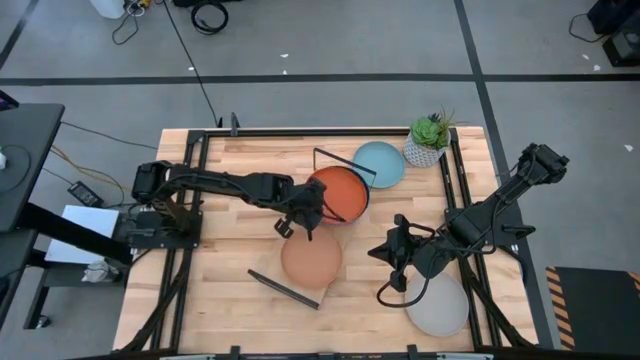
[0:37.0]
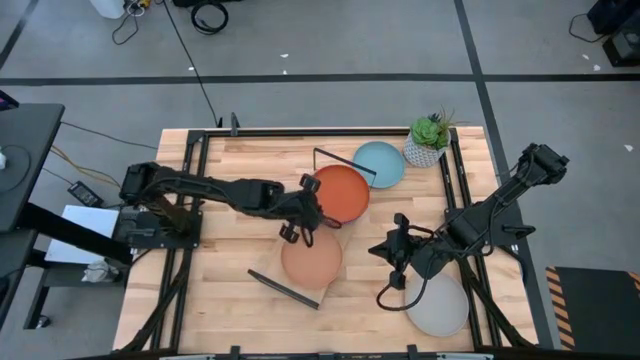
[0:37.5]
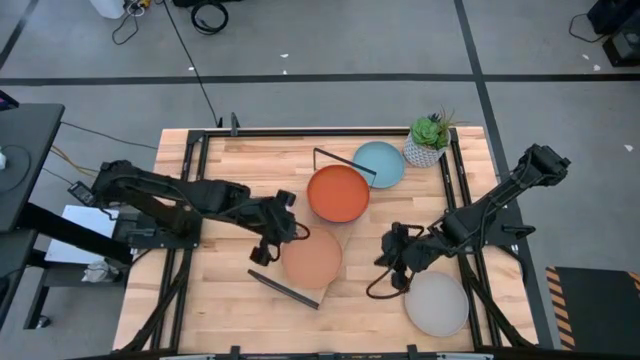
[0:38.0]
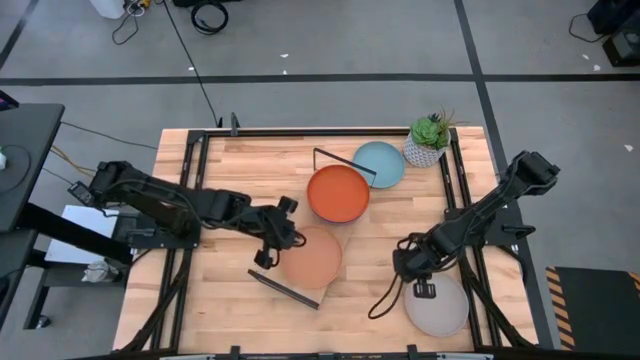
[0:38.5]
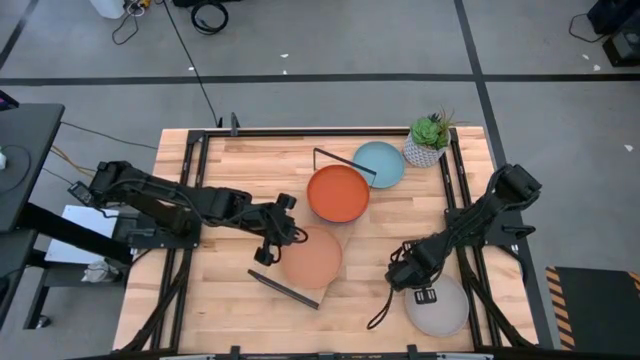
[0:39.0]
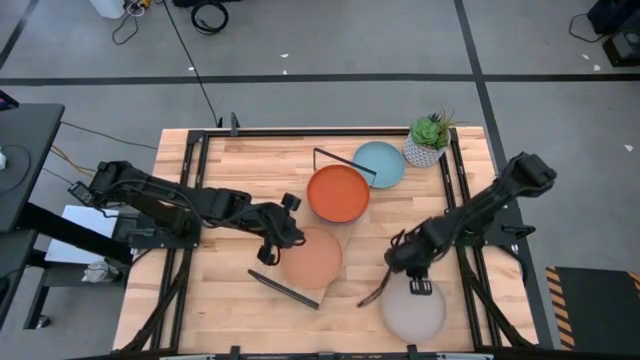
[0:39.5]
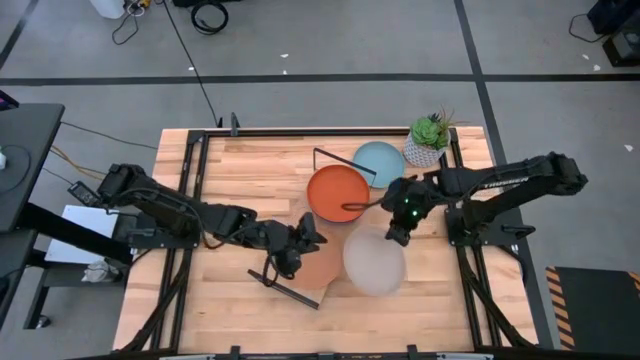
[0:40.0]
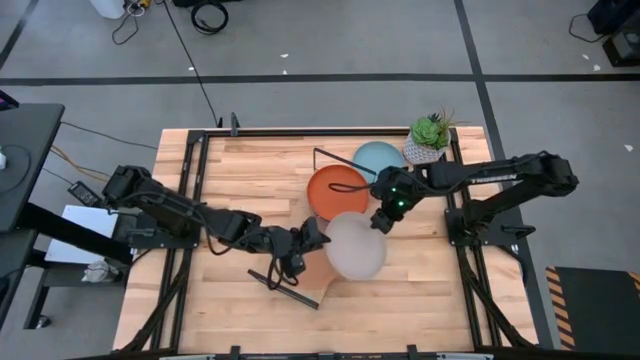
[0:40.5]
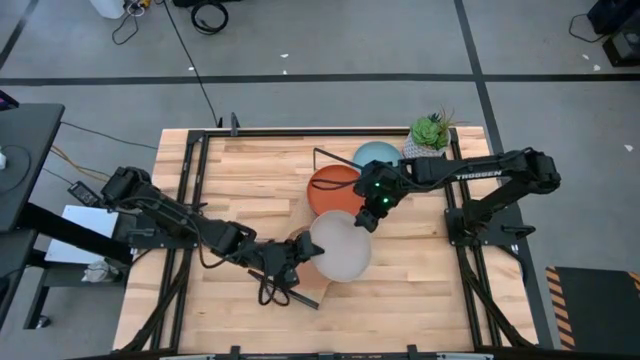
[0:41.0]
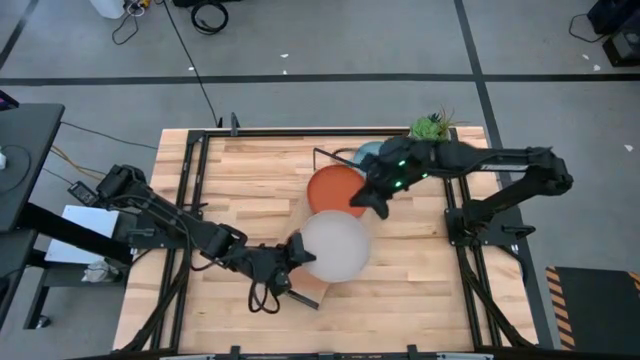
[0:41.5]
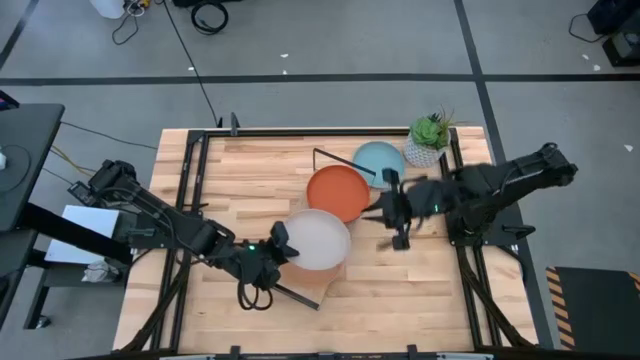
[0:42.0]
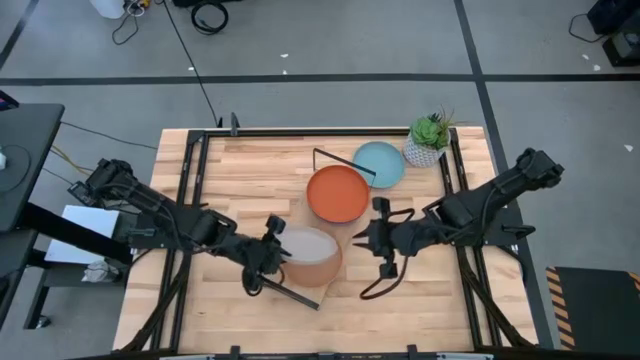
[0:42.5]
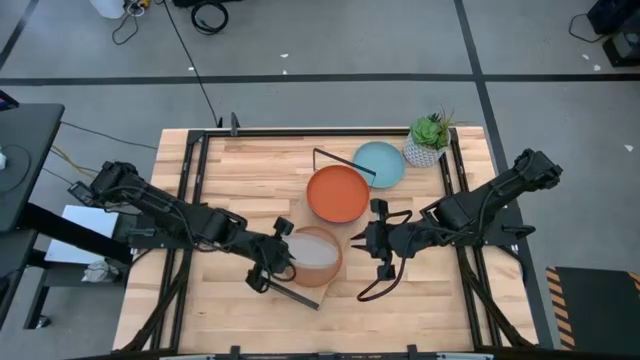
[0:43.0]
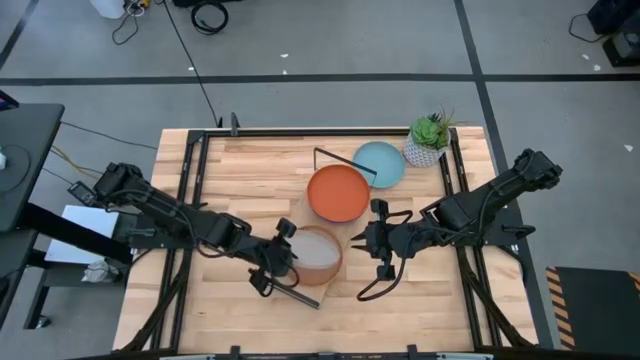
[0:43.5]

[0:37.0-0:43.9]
Task: Place and stack plates onto a shelf
Stack the white plate on top of the brown plate on the shelf

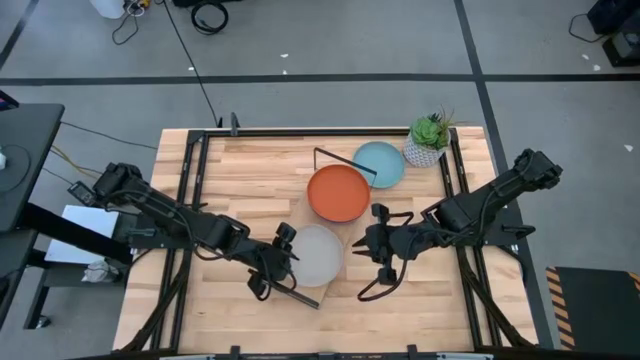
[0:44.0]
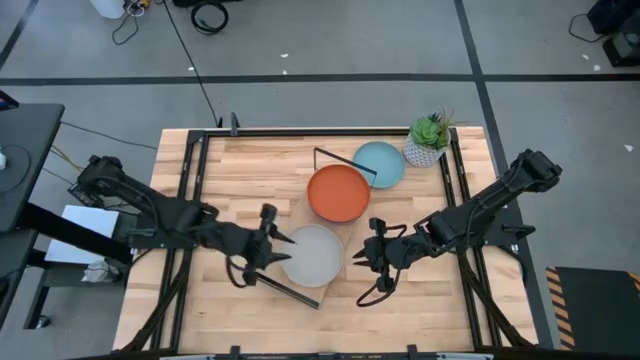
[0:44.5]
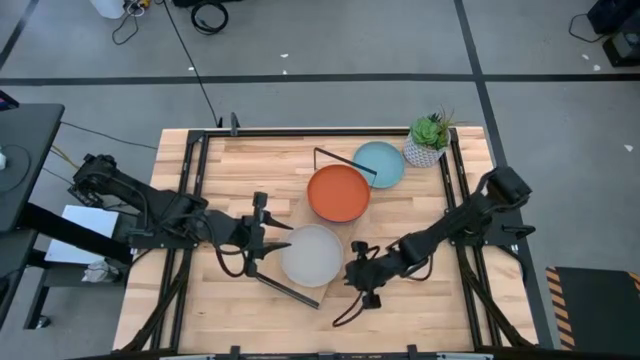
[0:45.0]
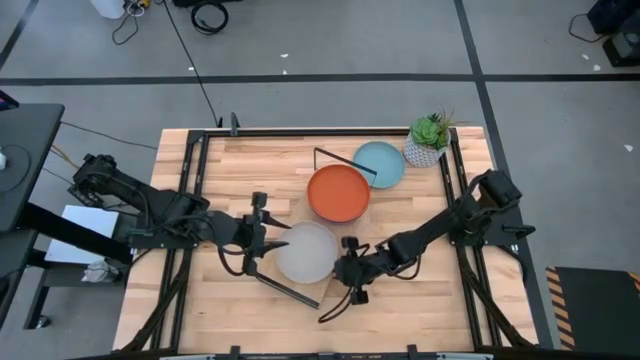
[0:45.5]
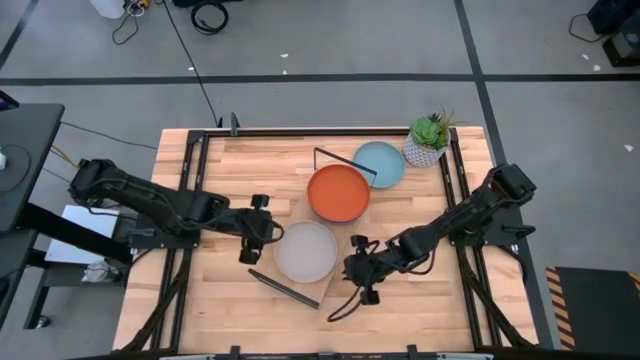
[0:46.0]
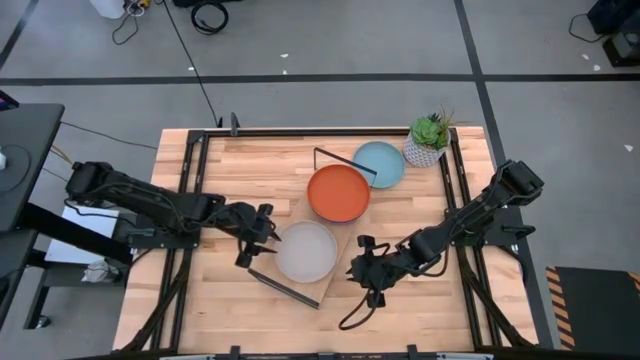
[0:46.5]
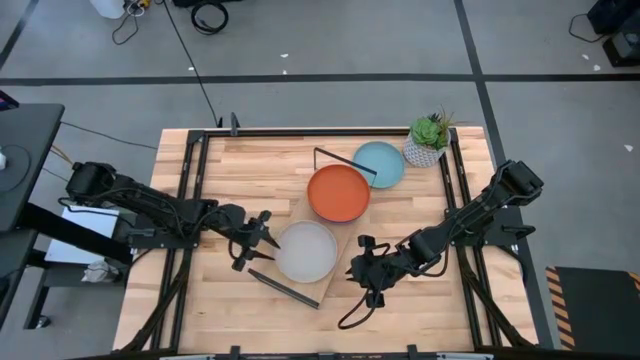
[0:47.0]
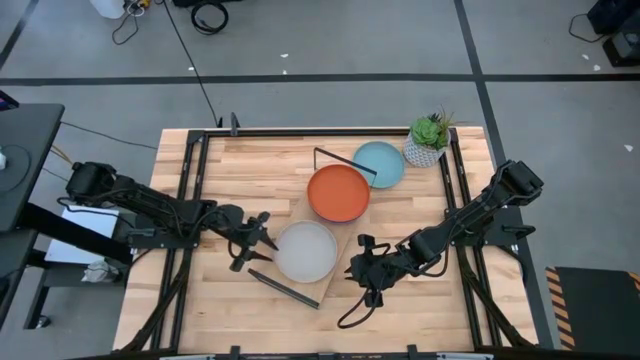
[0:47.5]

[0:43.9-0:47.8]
Adjust the left stack of plates on the shelf

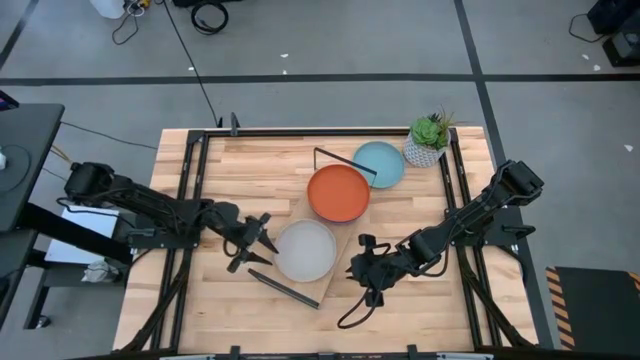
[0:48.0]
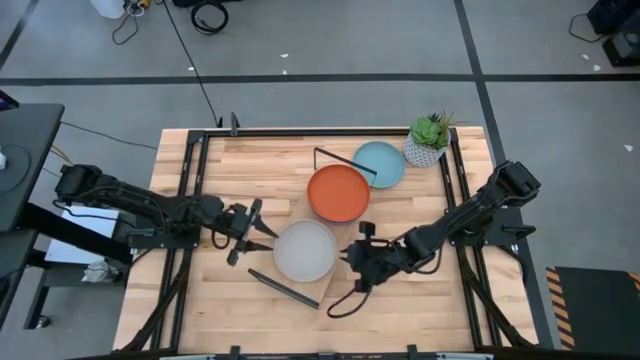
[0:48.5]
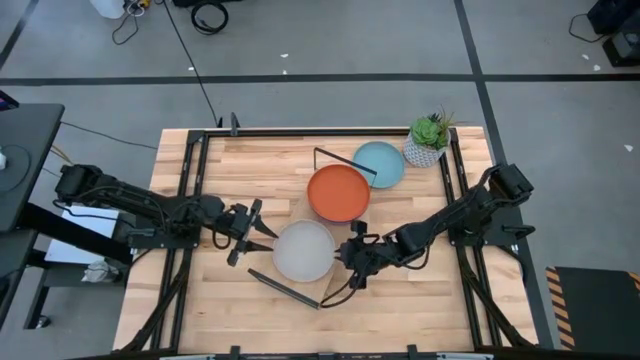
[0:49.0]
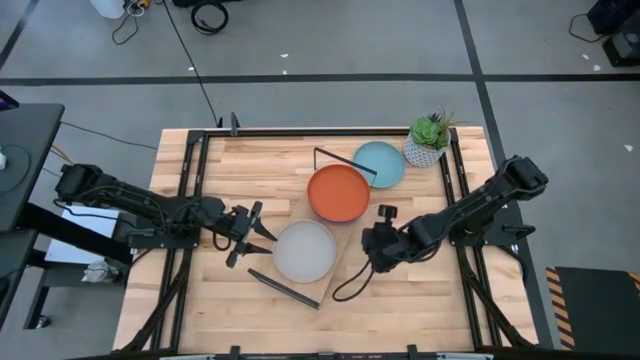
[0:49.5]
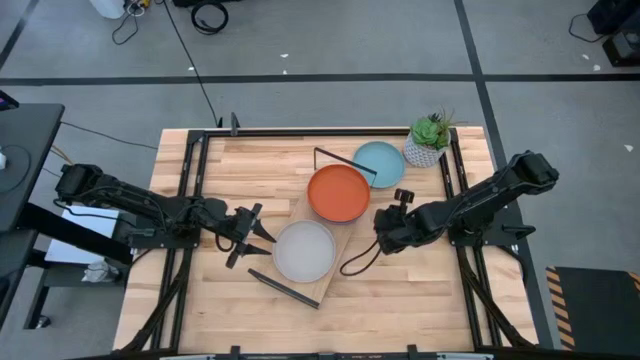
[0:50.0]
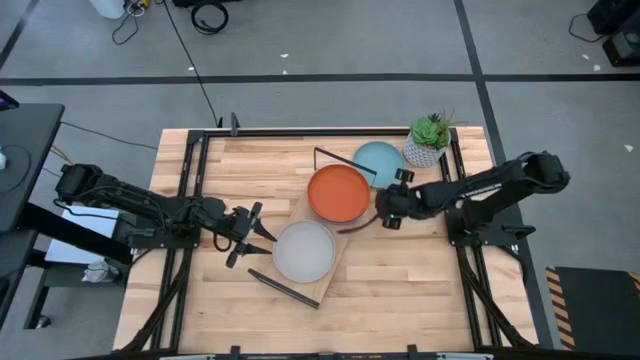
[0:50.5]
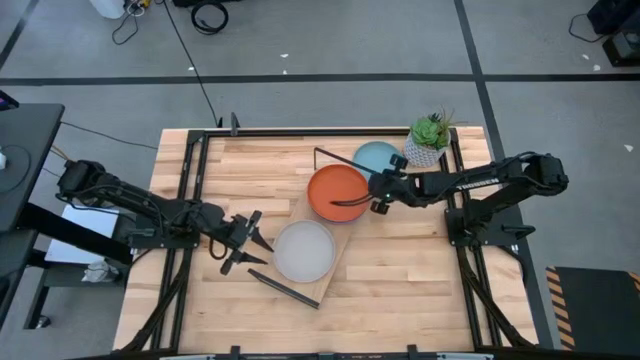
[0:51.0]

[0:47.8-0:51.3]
Adjust the shelf

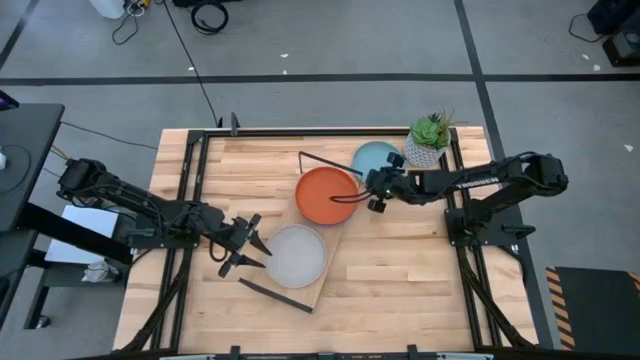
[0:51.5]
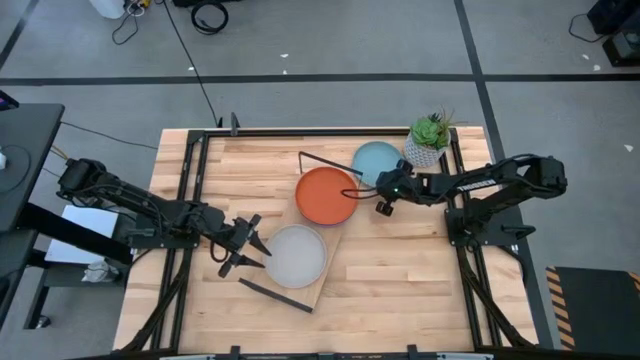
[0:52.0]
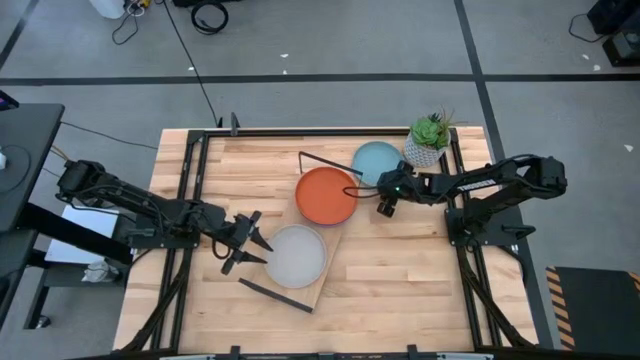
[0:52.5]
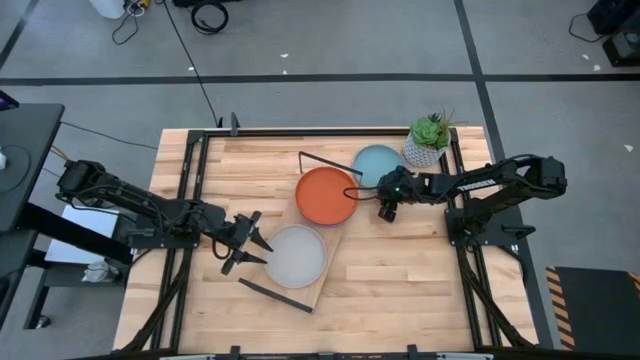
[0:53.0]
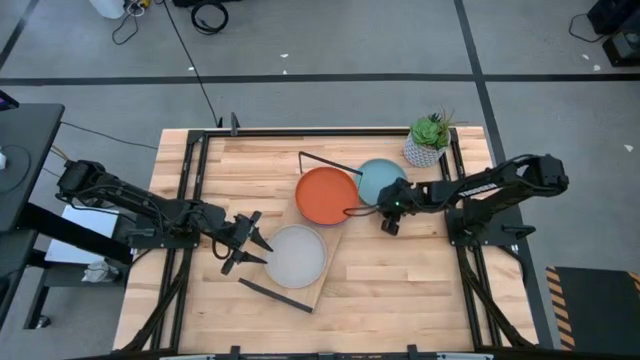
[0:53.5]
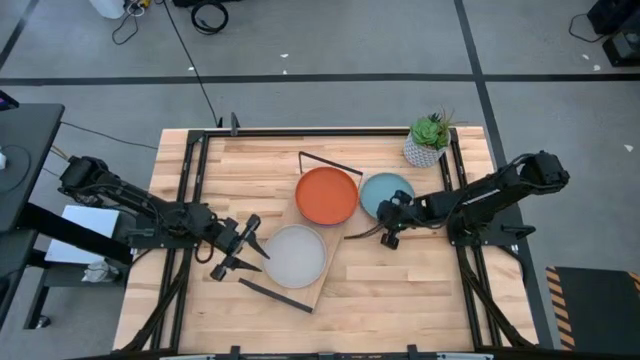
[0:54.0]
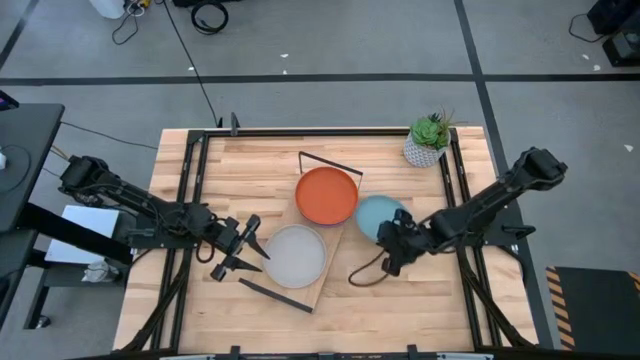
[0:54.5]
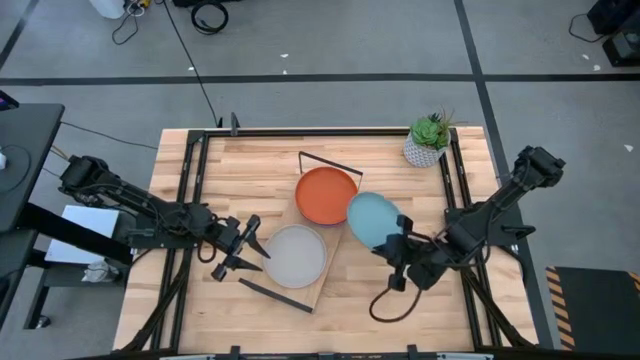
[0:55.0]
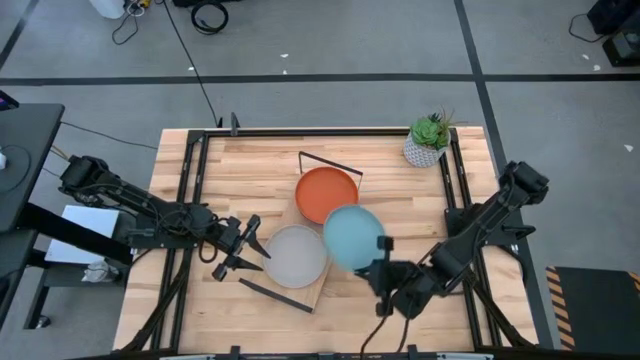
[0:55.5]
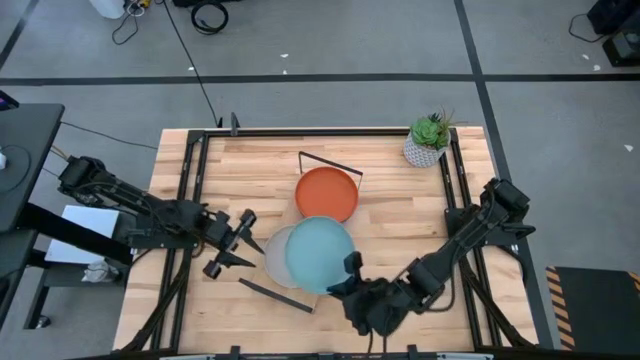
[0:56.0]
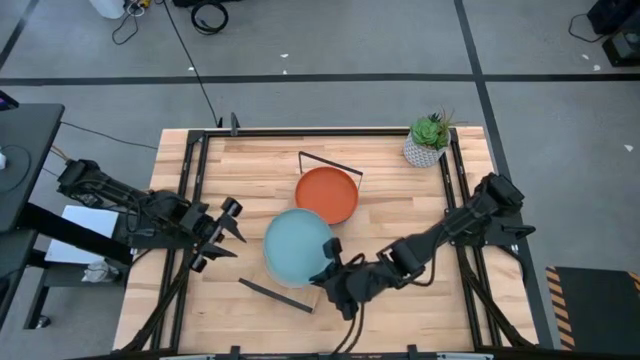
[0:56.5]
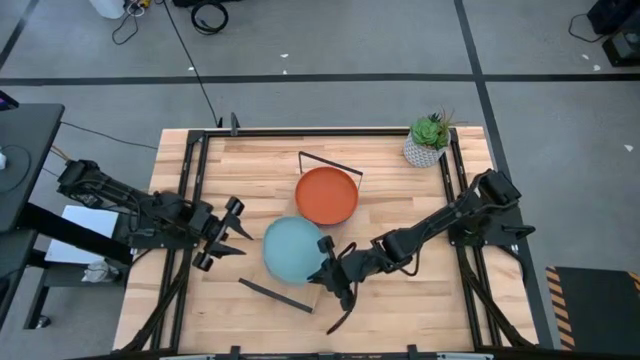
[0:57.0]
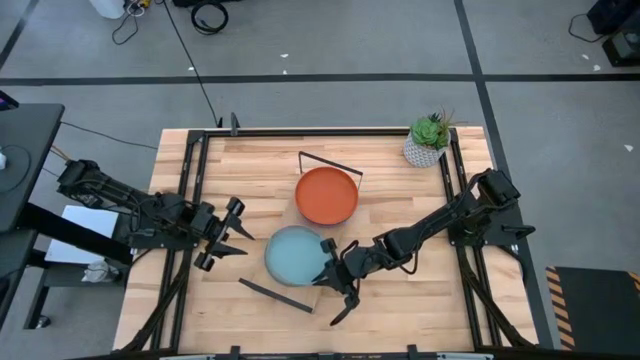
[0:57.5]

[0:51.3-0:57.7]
Stack the light blue plate on top of the white plate on the shelf

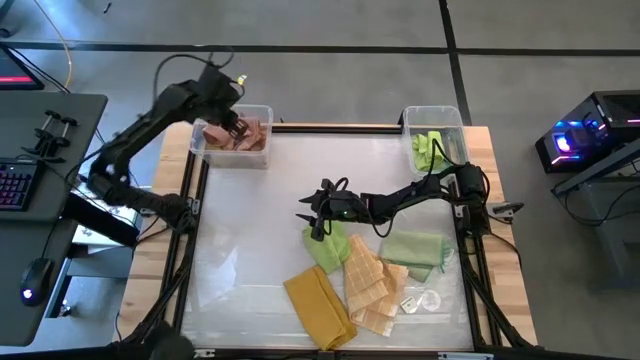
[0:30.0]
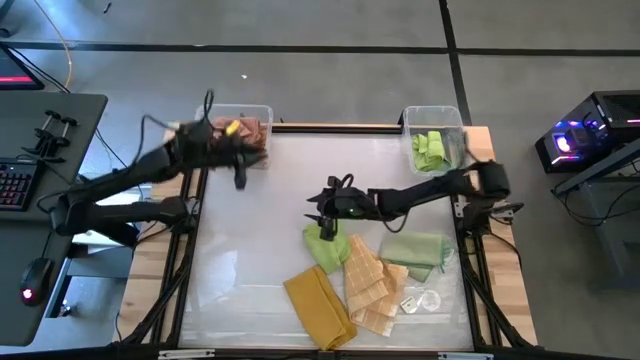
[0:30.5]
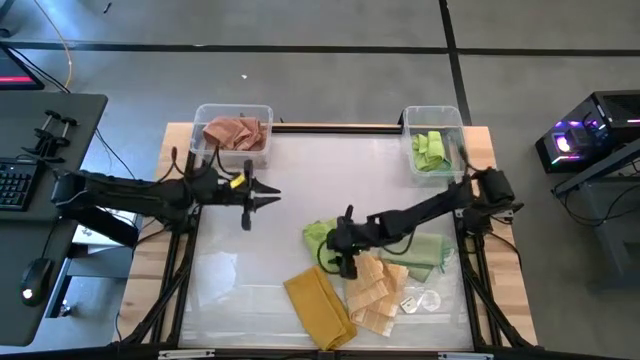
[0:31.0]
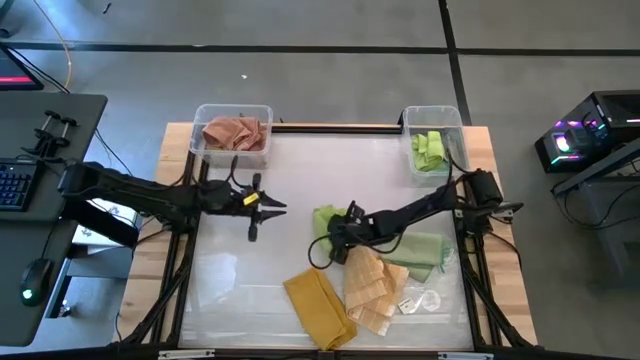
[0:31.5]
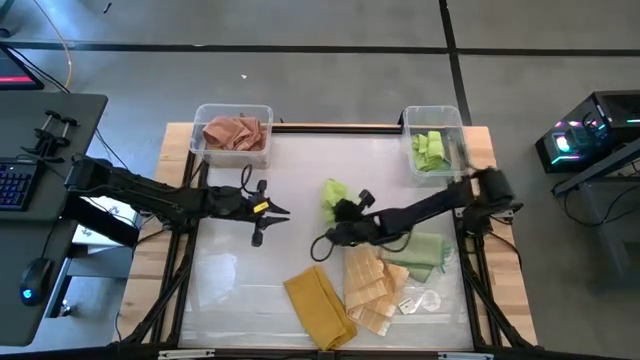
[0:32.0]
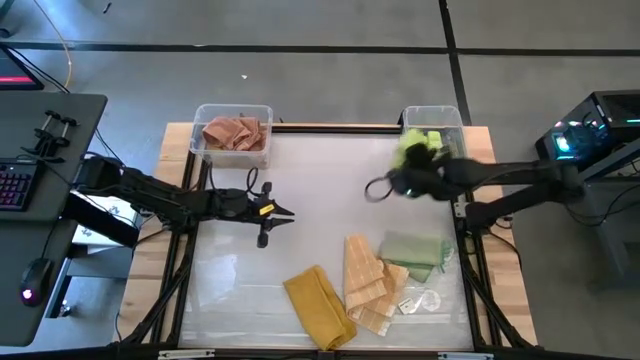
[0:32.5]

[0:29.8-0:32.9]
Task: Sort towels by color in basket
Put the green microfiber cloth into the right transparent bin
